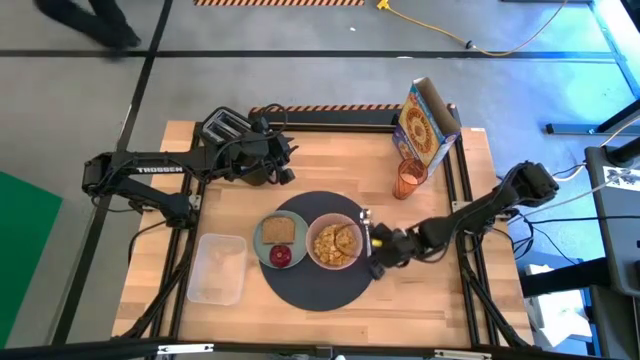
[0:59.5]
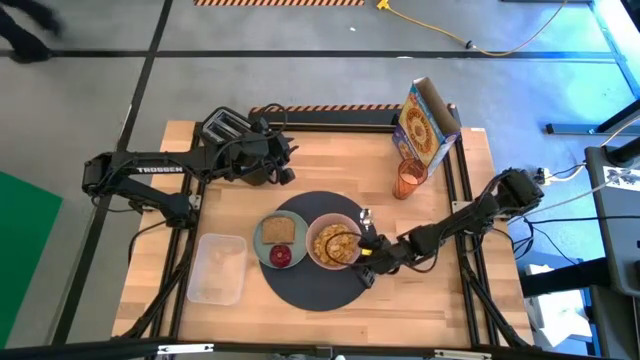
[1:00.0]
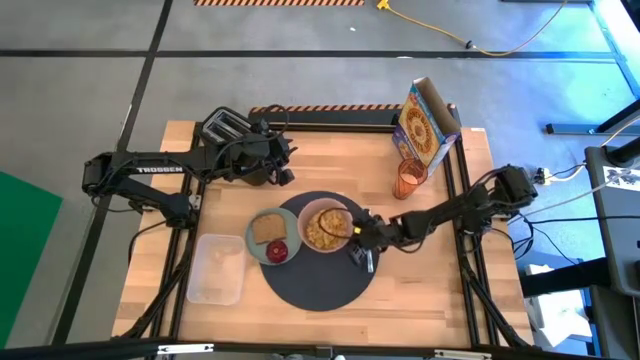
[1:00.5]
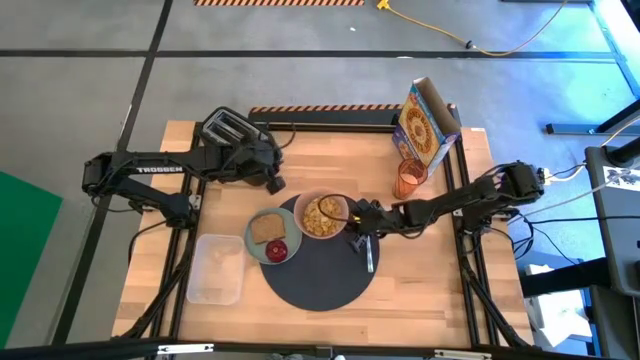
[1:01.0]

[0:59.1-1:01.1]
Task: Arrange a breakfast setting
Adjust the light pink bowl

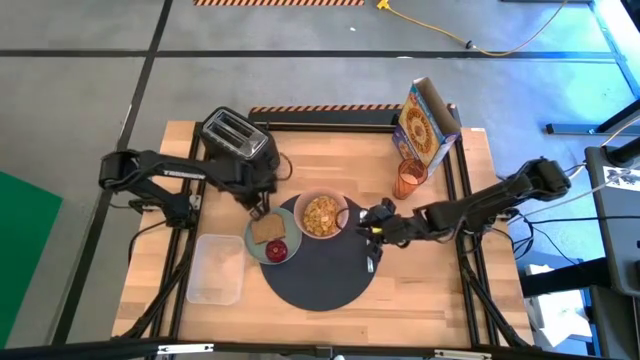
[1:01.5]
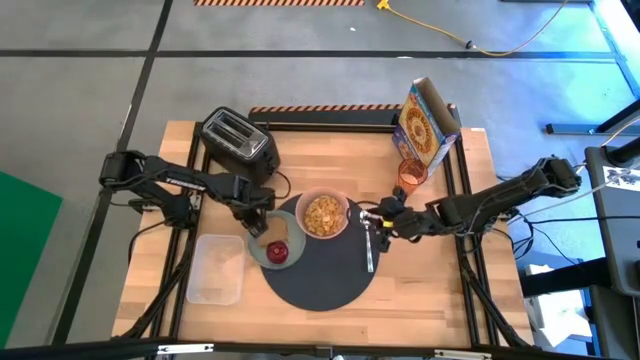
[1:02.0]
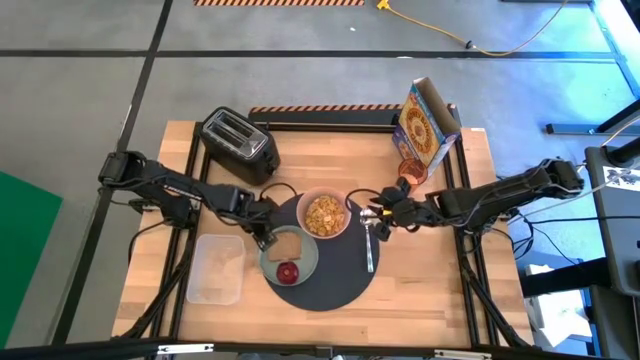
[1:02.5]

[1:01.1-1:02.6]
Adjust the blue plate

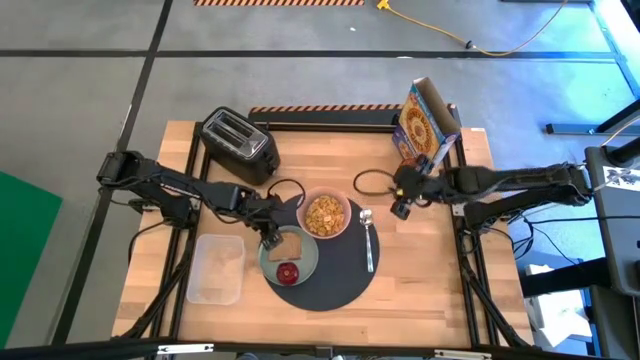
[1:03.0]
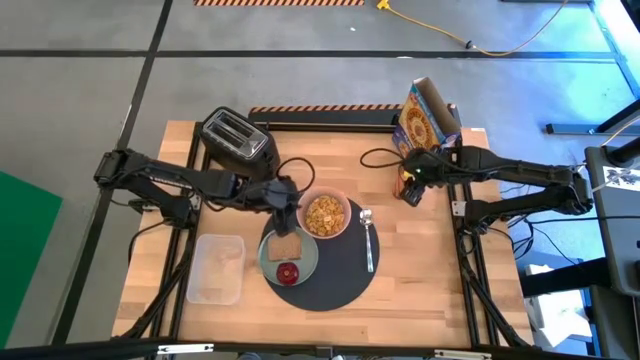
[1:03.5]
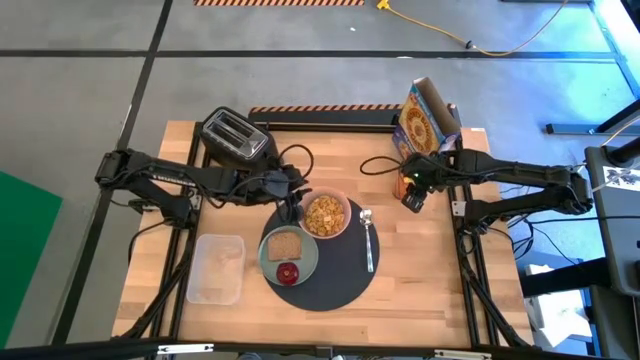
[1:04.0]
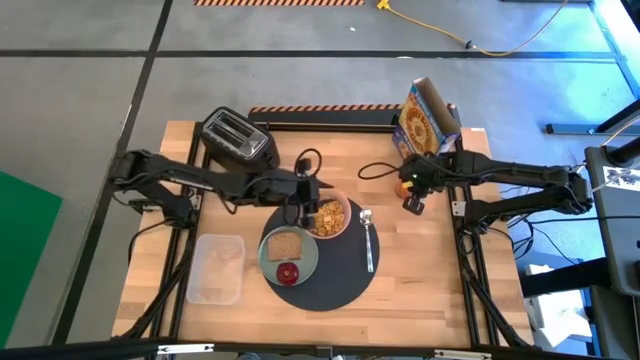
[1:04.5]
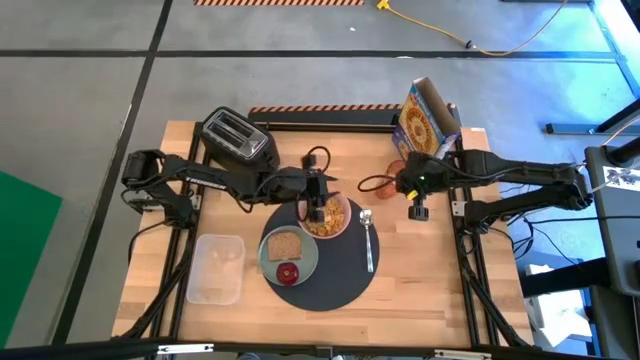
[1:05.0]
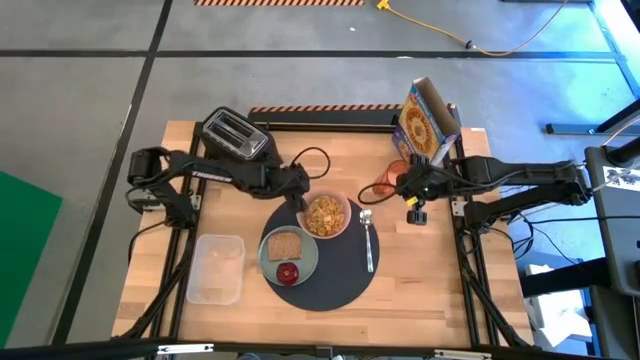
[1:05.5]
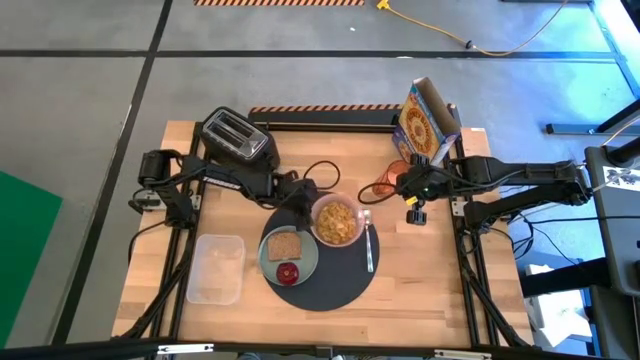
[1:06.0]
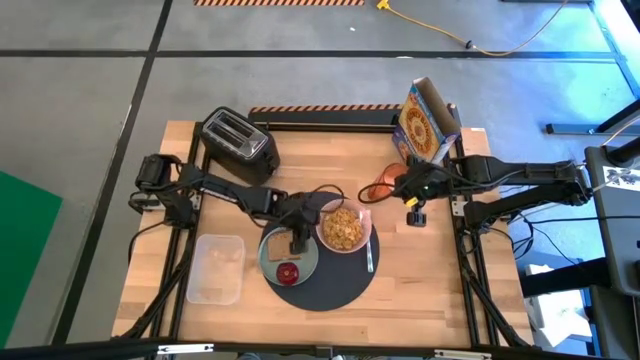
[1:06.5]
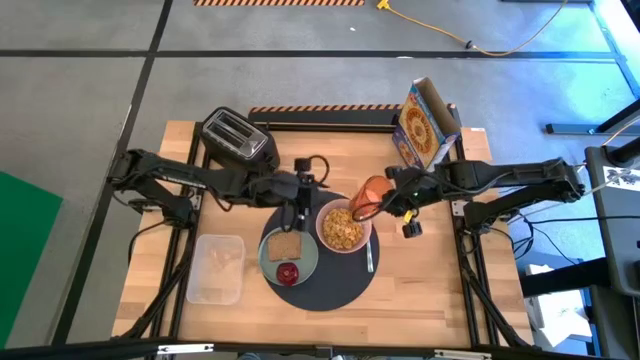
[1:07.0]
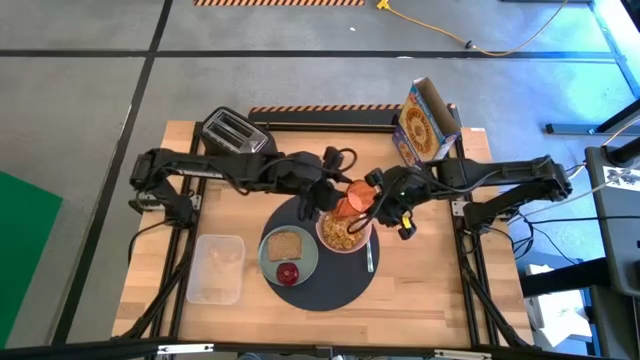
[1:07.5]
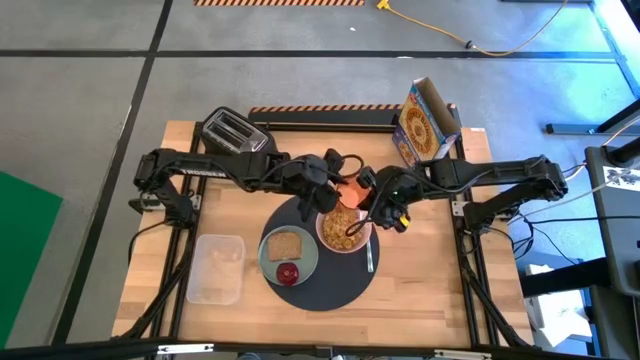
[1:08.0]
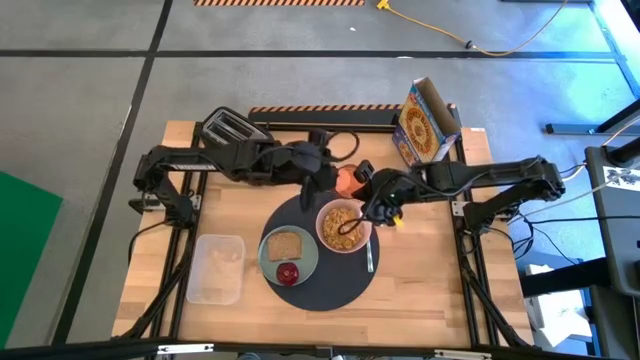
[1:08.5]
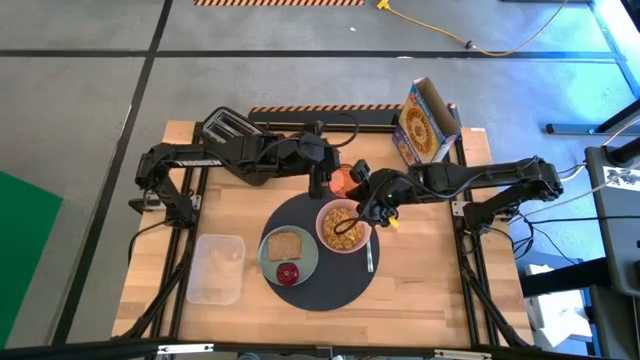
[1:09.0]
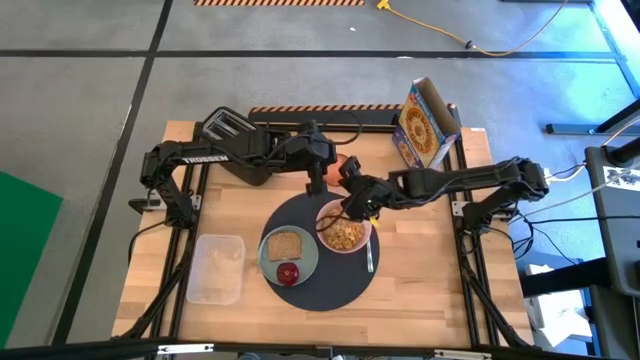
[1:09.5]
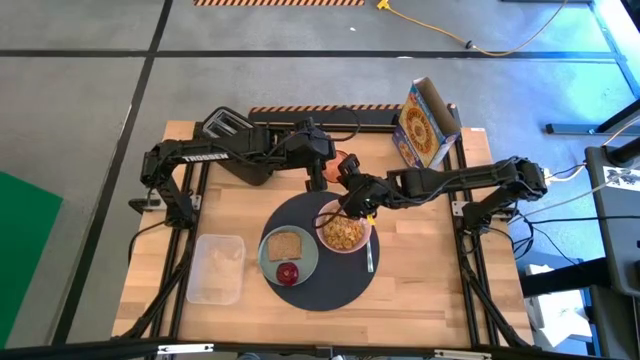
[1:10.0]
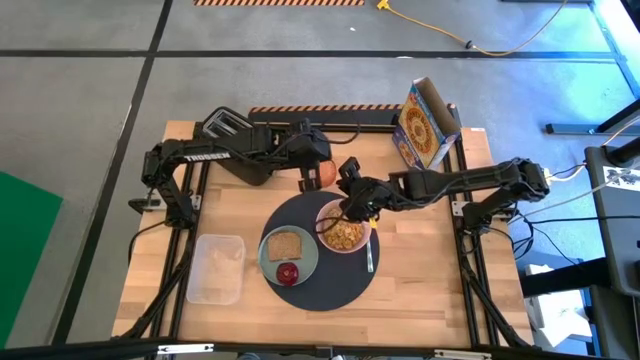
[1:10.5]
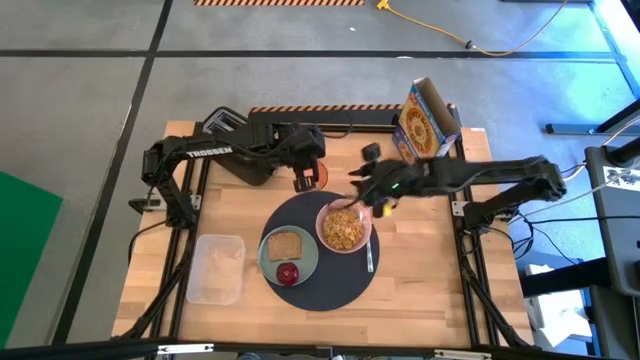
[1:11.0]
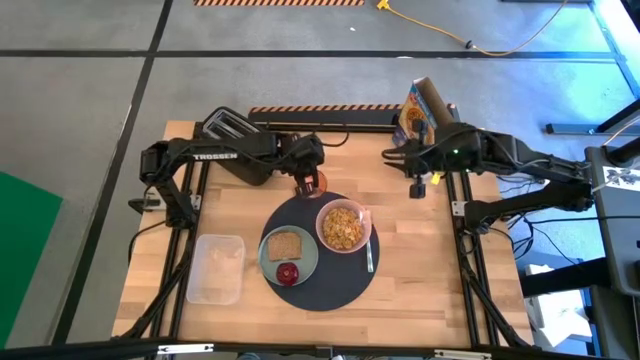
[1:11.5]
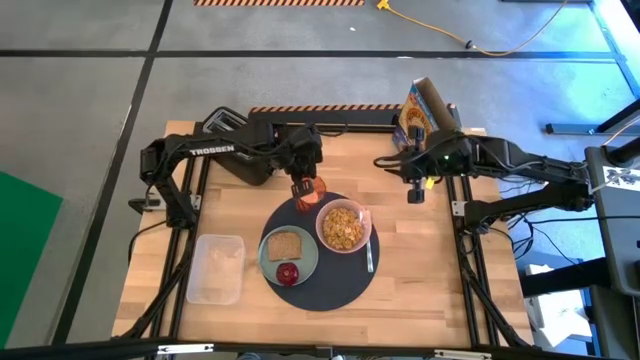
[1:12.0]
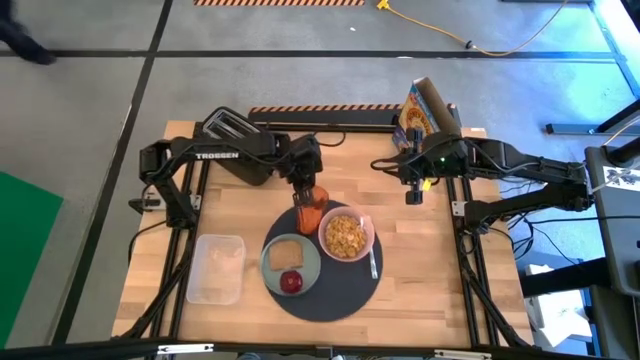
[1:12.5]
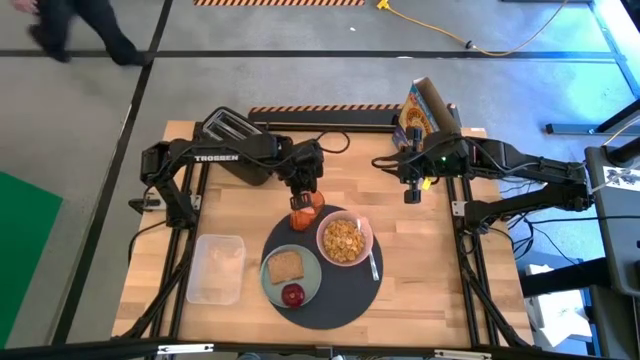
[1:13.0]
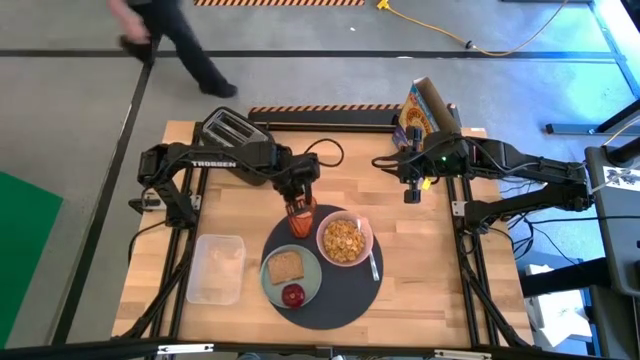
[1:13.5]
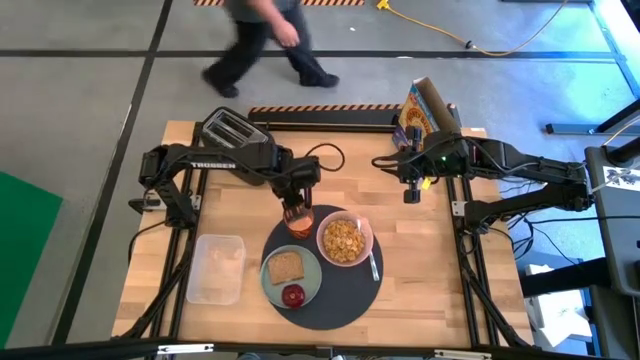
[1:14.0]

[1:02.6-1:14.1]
Put the orange cup on the table mat

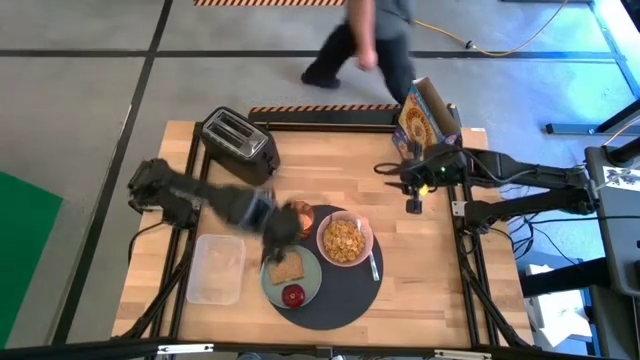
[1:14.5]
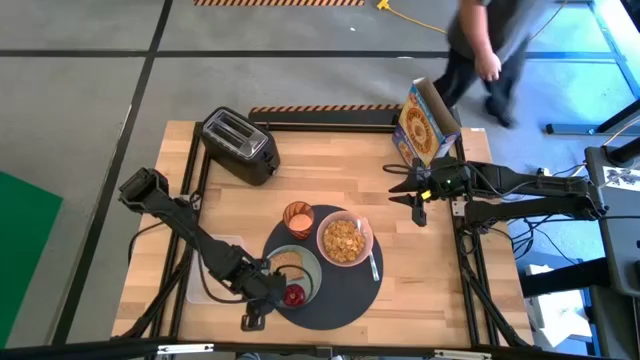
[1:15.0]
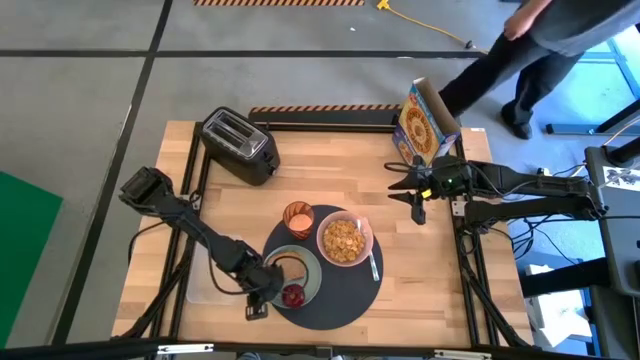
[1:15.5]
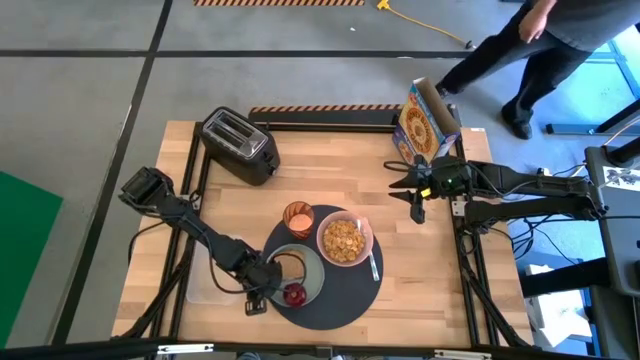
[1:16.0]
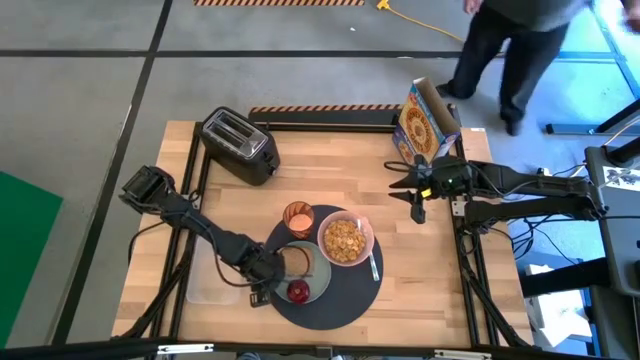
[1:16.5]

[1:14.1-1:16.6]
Adjust the blue plate

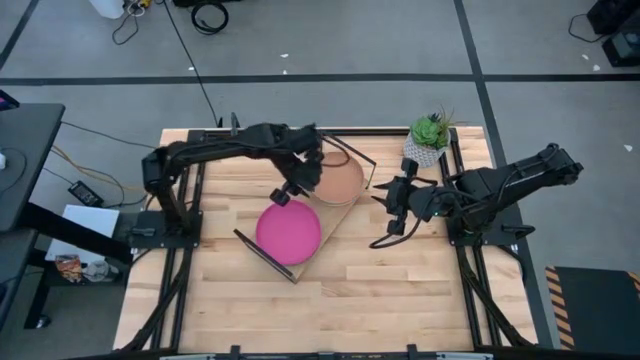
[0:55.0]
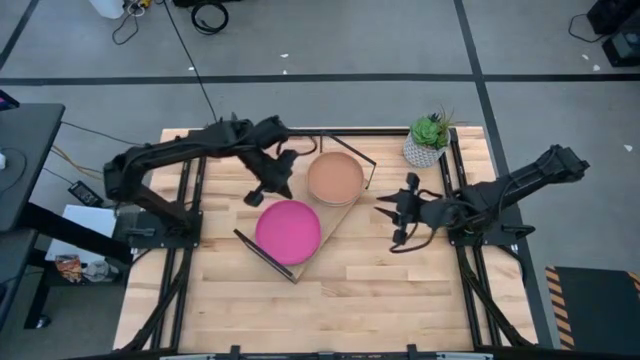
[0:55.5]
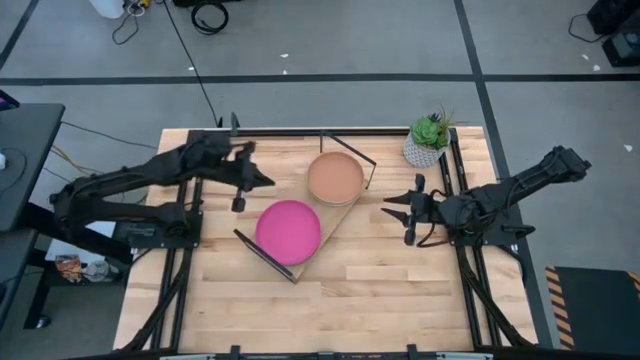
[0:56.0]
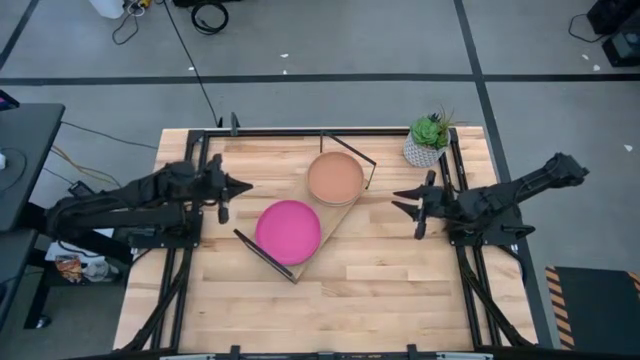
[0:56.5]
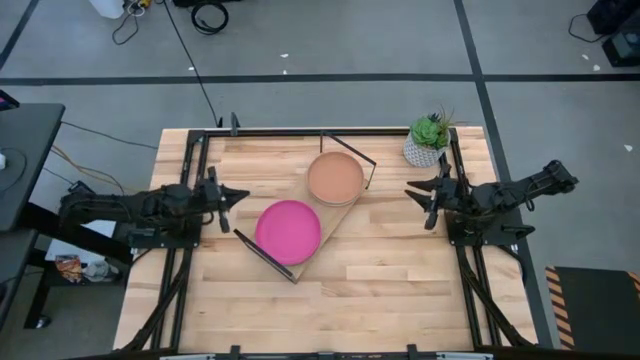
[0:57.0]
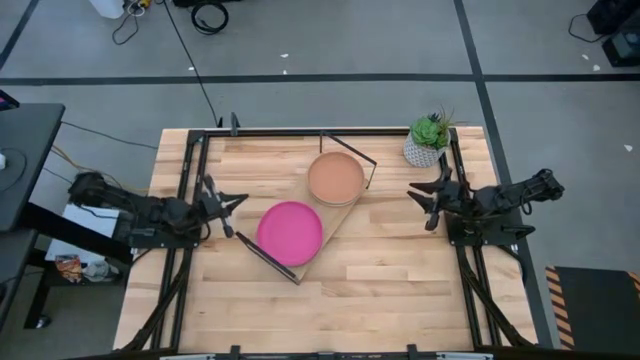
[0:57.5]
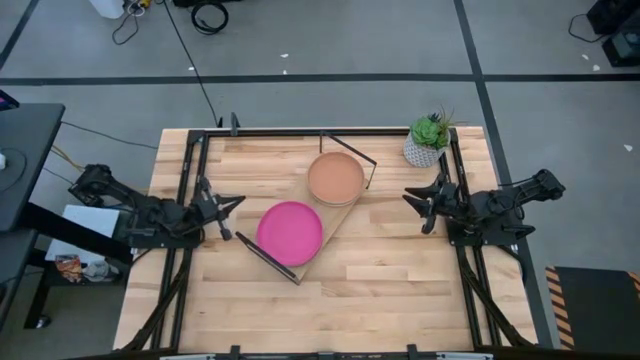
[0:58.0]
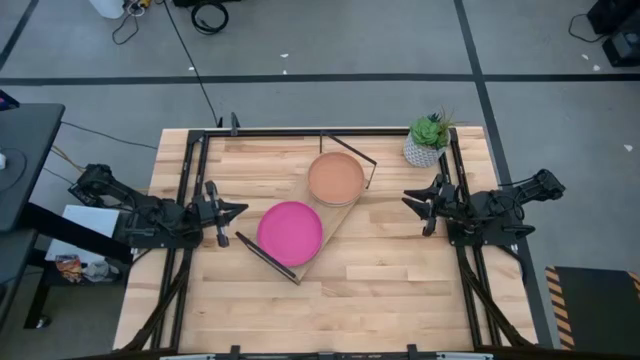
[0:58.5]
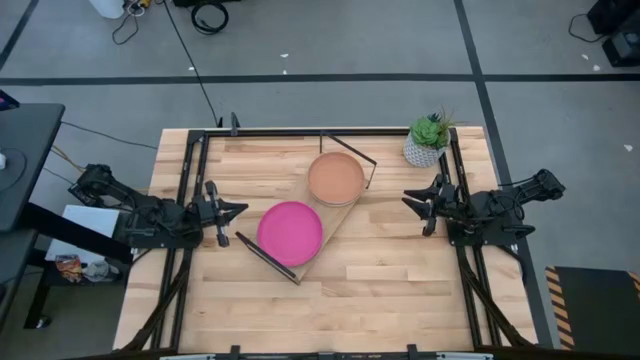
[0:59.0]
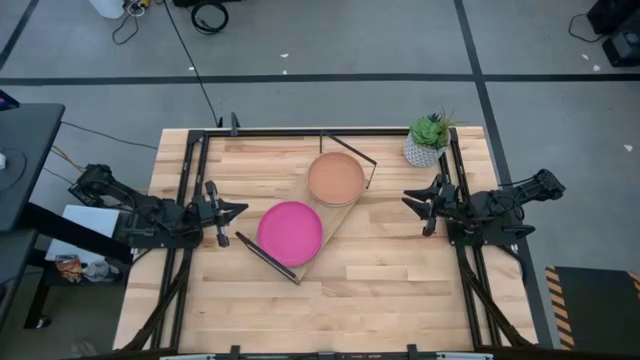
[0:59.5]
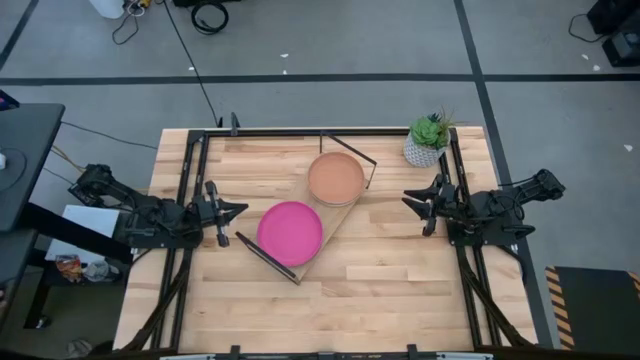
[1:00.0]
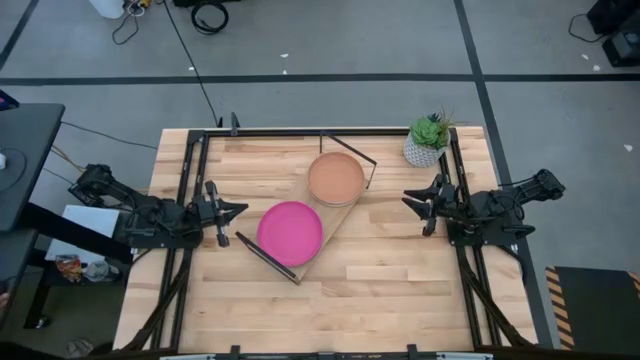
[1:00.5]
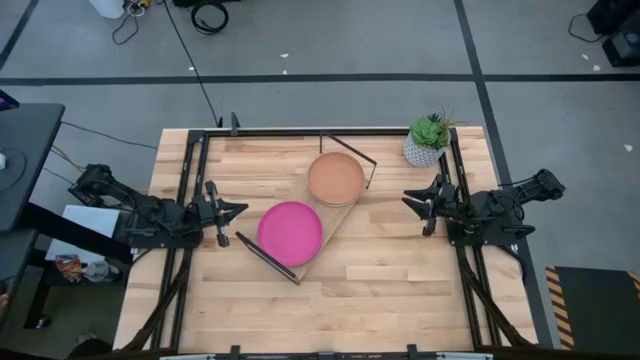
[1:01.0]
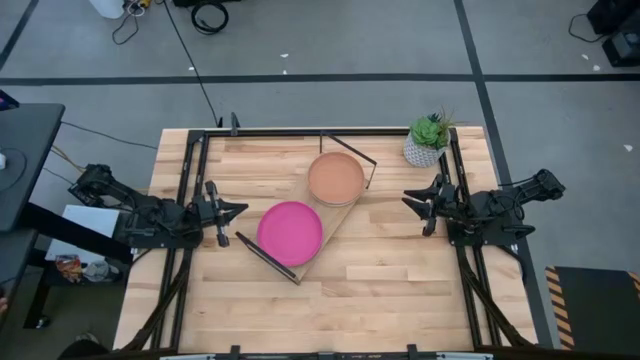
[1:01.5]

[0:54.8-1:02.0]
Task: Place and stack plates onto a shelf
Return to Home Position
